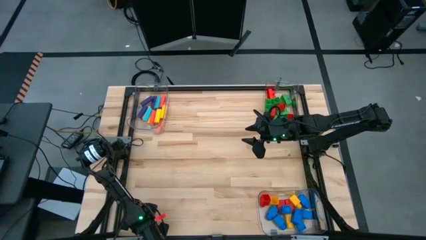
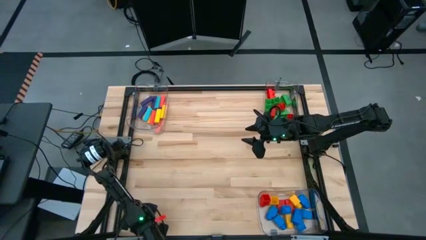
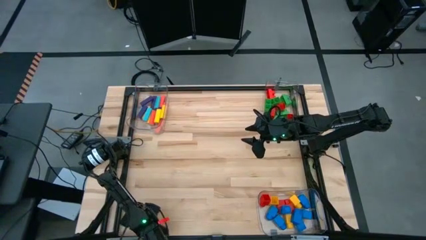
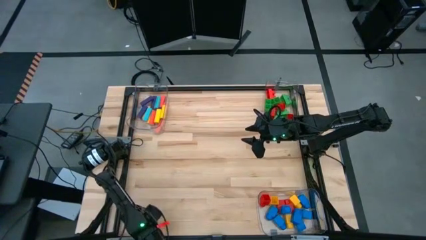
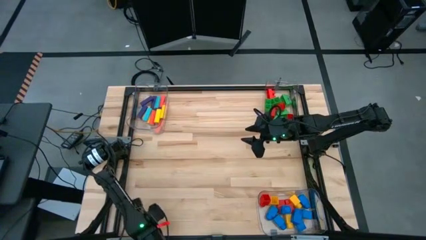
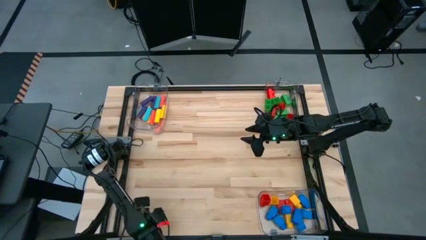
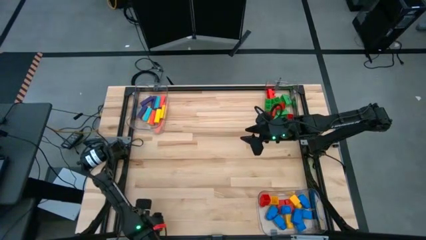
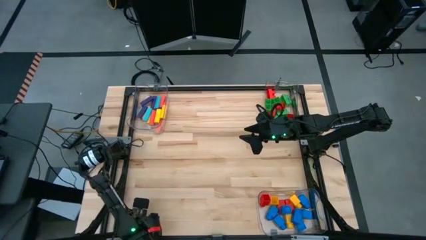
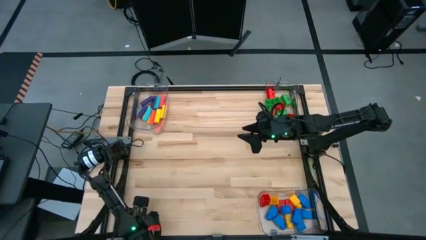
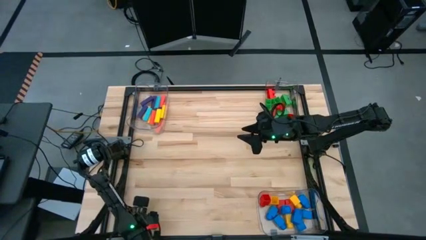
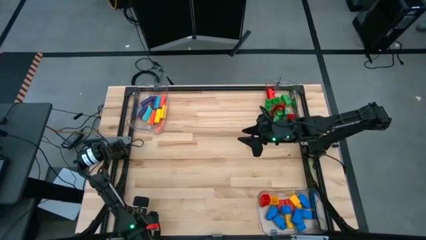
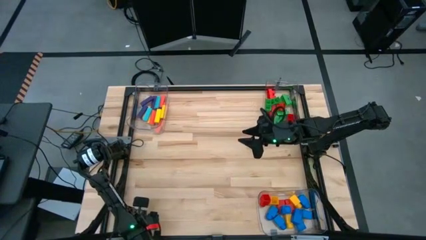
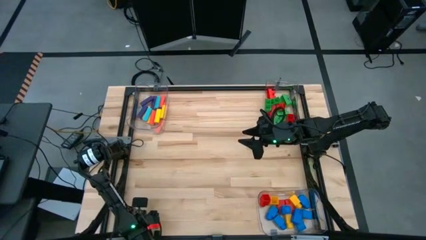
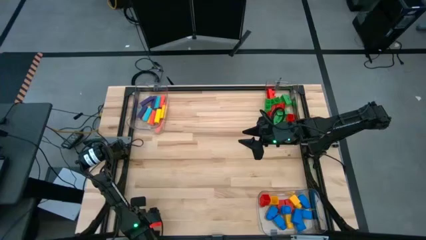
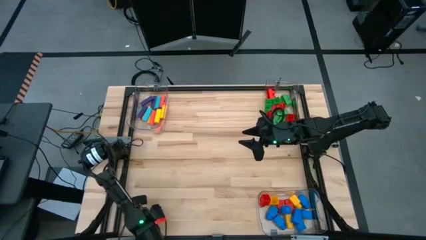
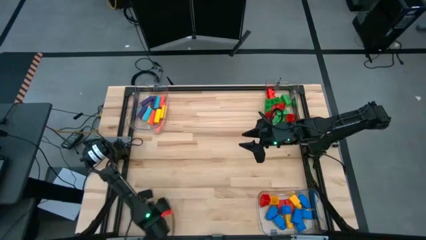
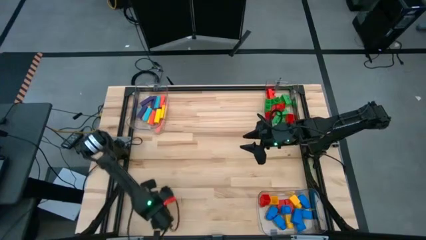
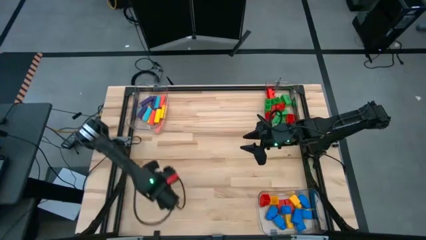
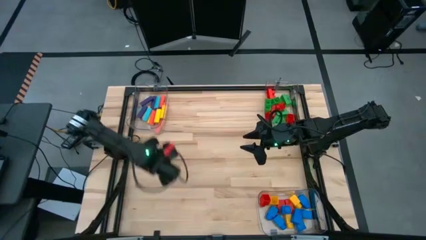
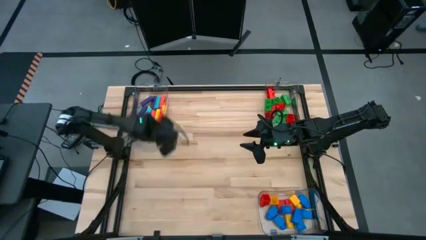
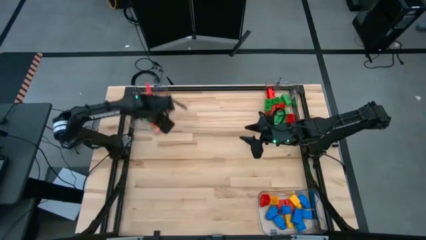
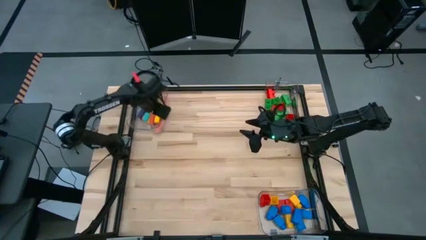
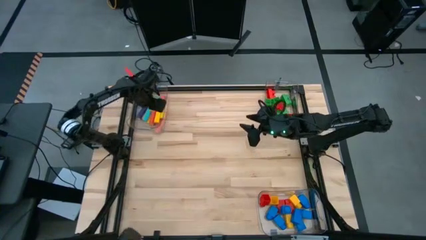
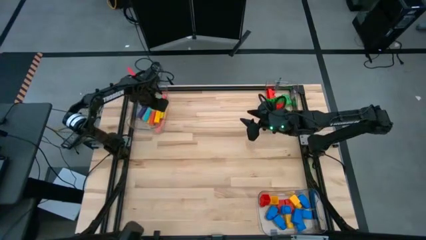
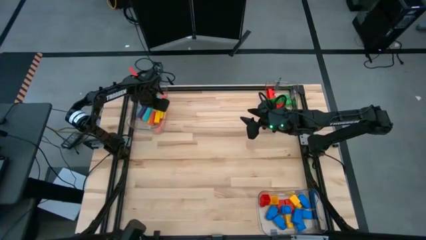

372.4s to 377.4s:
Task: Sort blocks by size
Put the light green block into the top left transparent bin

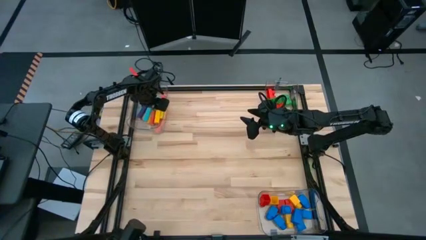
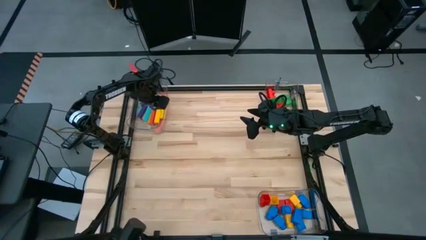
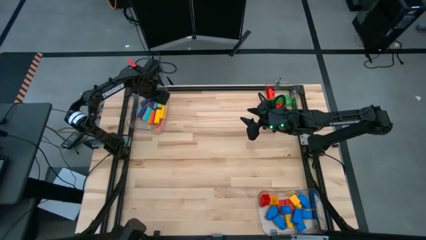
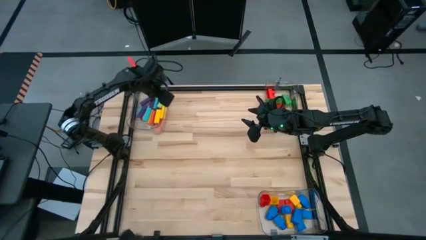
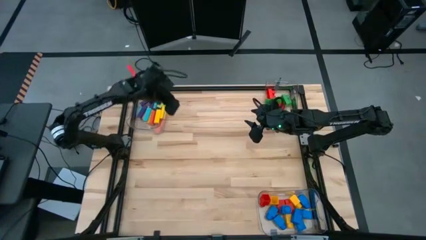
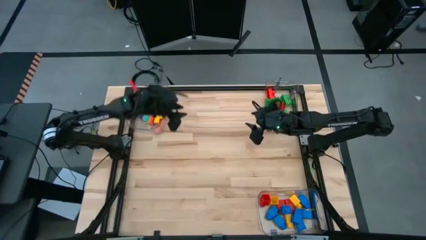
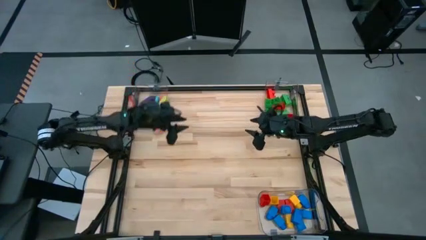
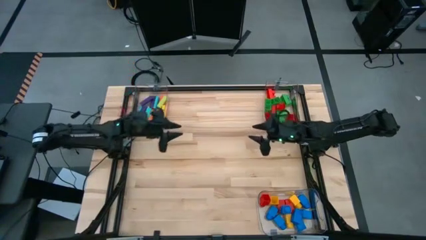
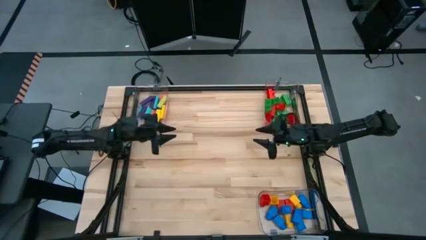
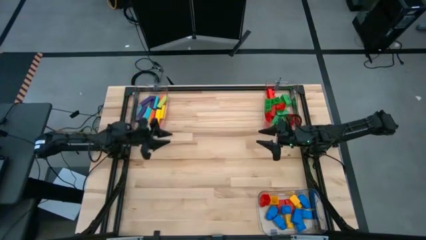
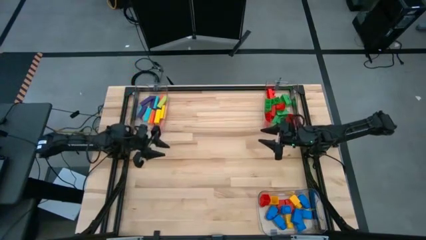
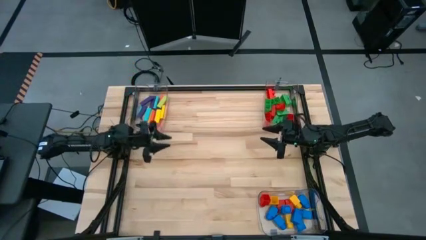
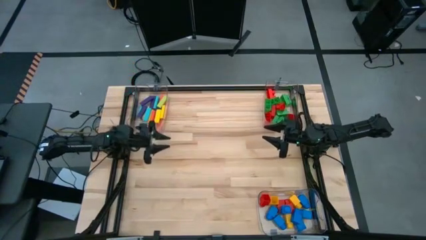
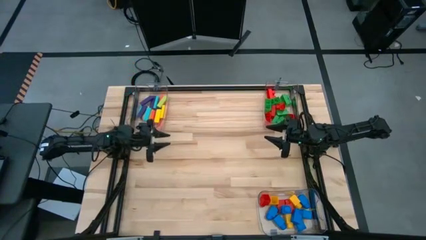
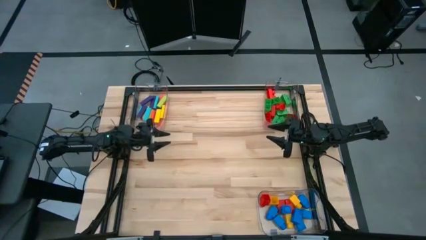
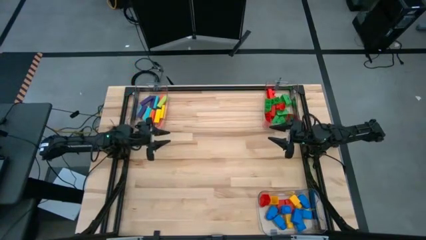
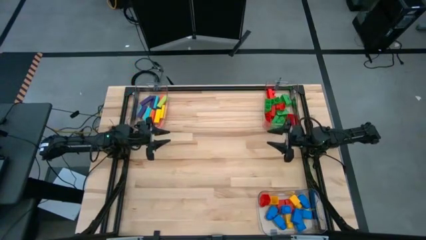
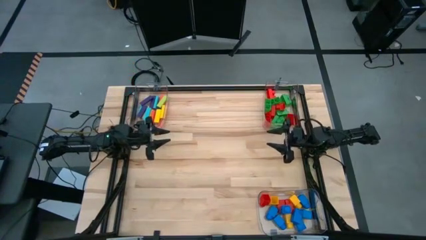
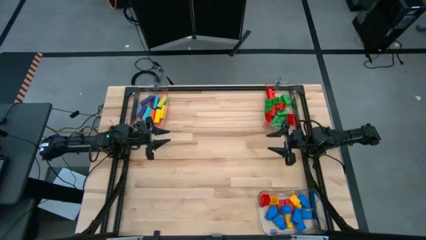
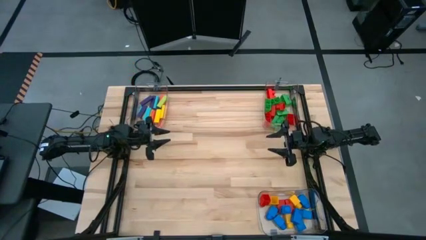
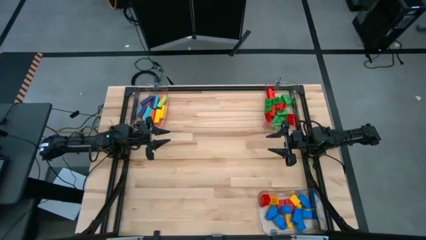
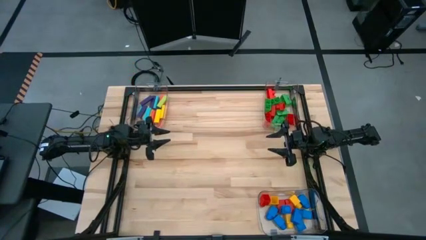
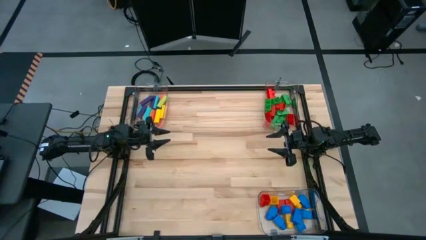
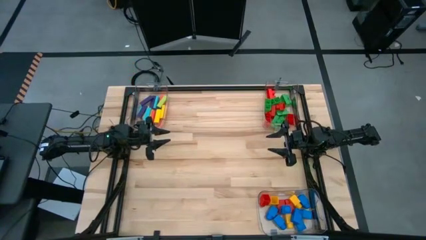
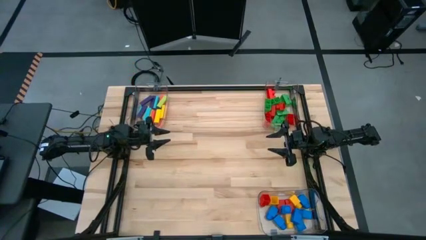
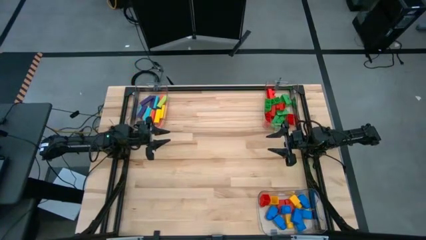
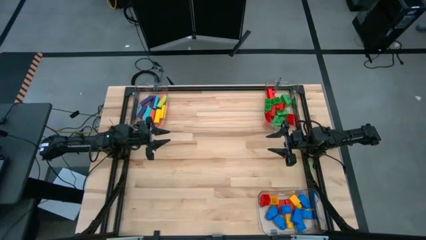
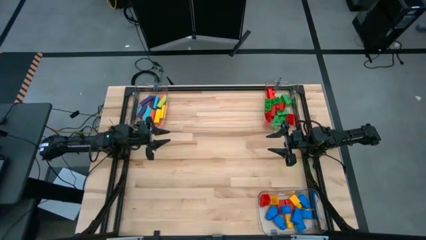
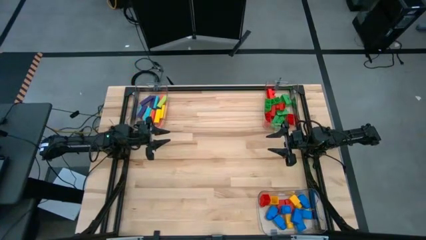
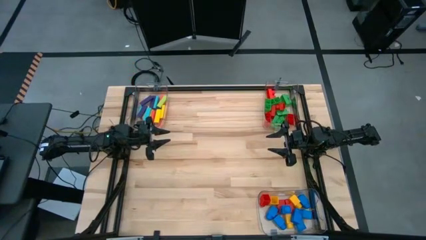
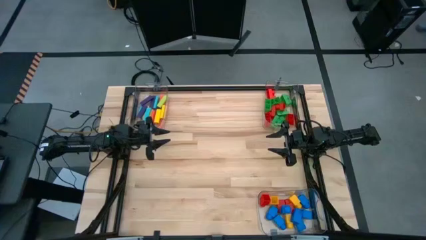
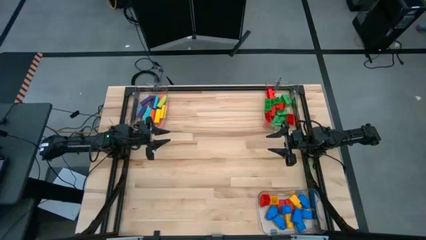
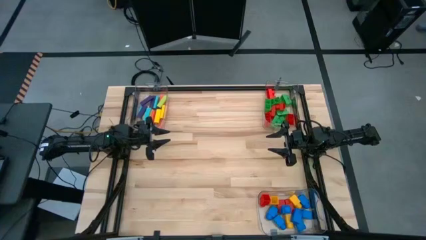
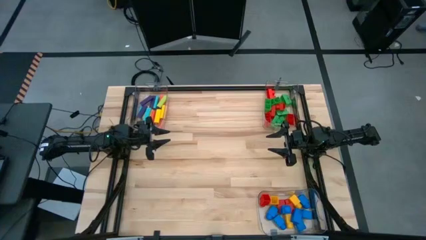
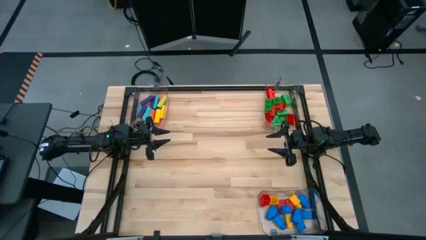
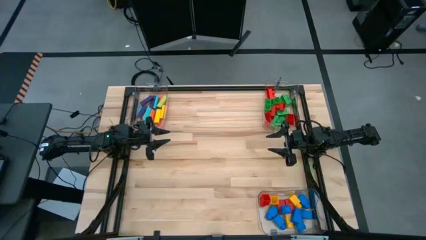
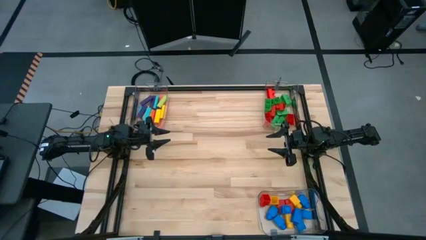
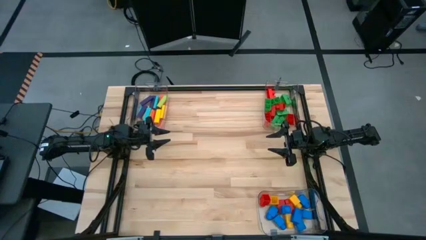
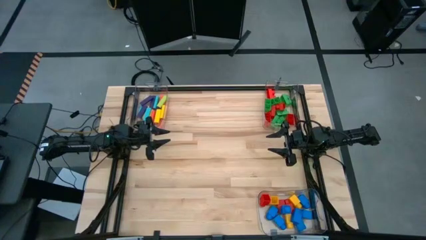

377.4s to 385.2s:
Return to Home Position
